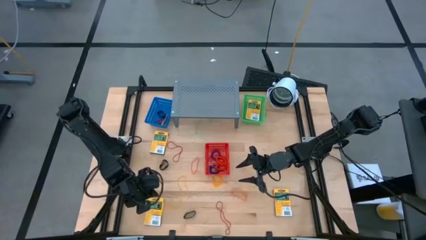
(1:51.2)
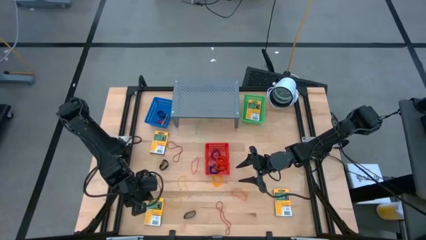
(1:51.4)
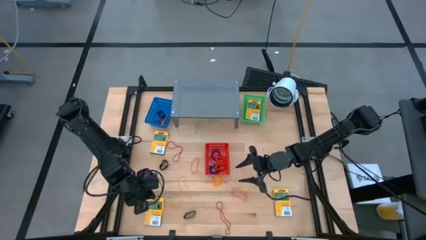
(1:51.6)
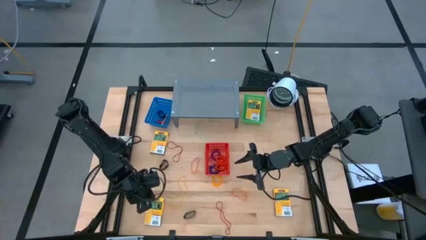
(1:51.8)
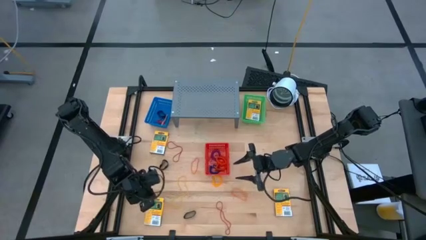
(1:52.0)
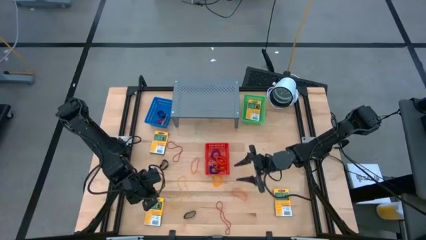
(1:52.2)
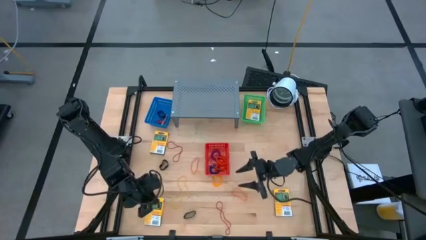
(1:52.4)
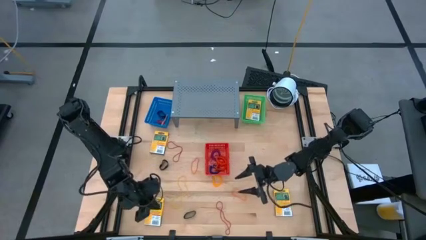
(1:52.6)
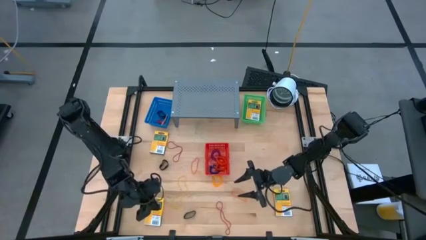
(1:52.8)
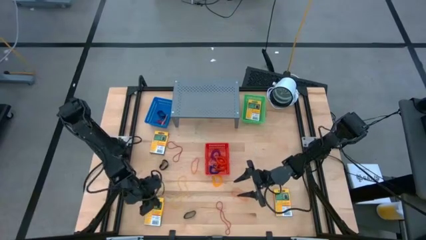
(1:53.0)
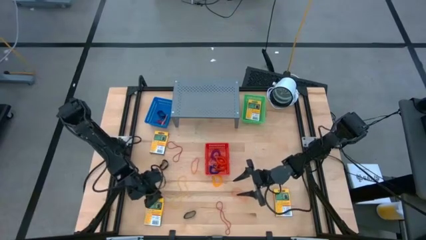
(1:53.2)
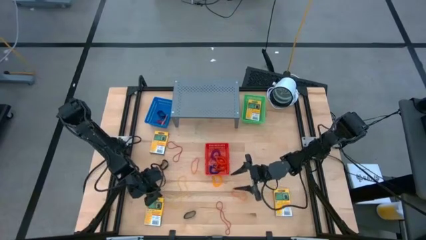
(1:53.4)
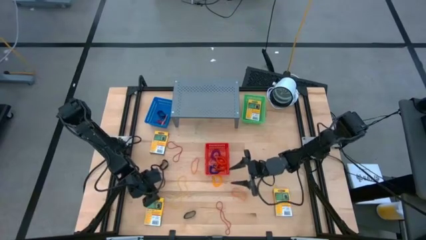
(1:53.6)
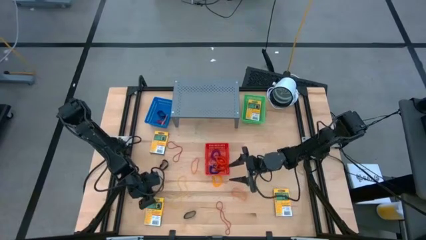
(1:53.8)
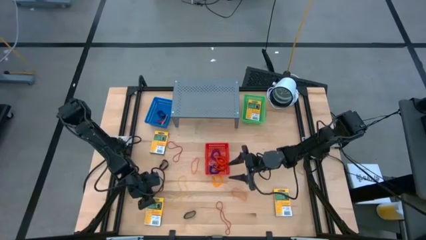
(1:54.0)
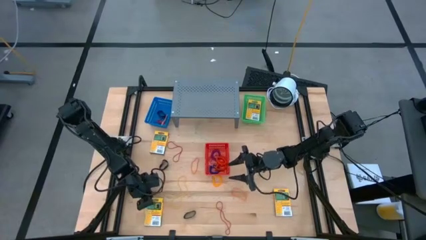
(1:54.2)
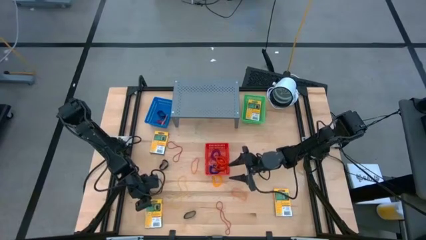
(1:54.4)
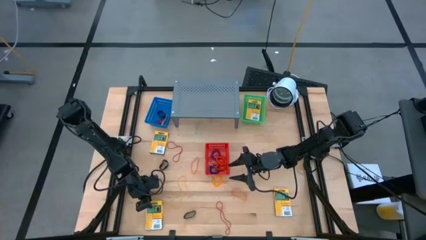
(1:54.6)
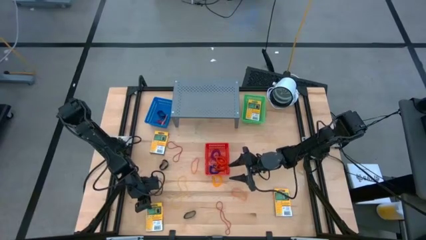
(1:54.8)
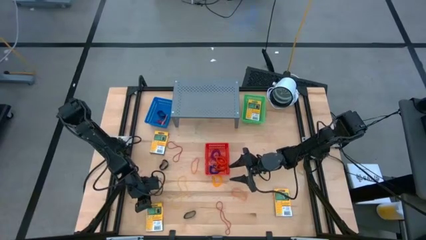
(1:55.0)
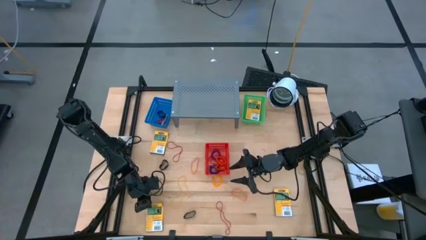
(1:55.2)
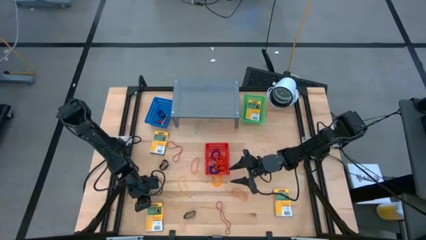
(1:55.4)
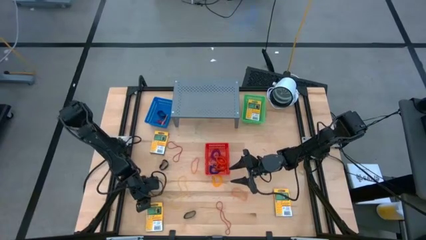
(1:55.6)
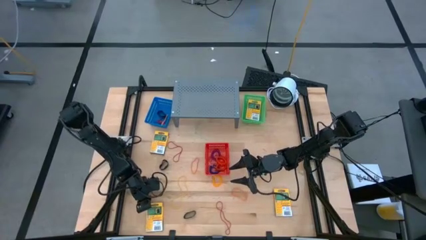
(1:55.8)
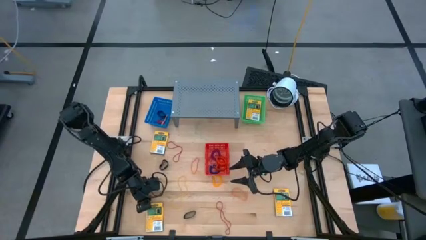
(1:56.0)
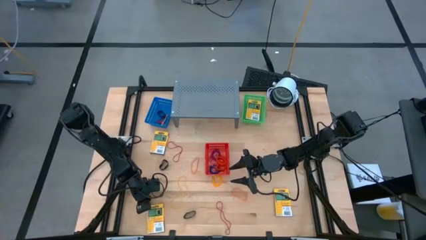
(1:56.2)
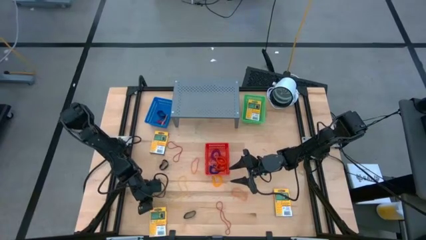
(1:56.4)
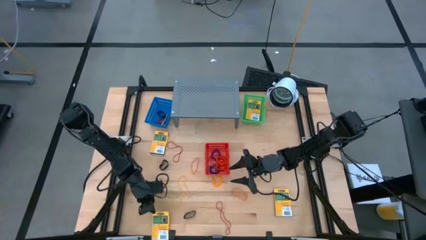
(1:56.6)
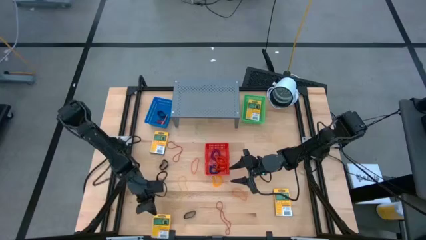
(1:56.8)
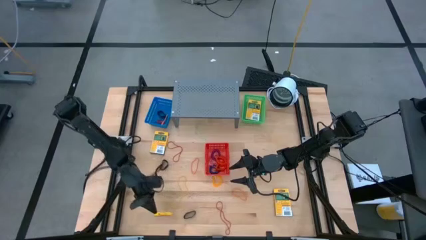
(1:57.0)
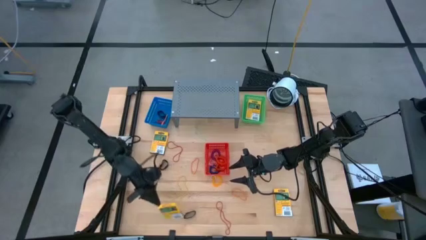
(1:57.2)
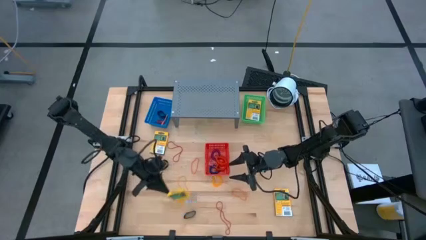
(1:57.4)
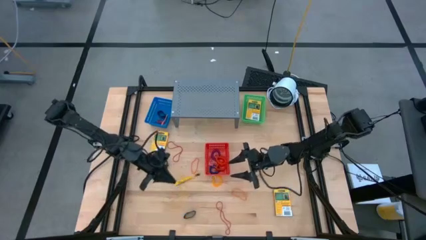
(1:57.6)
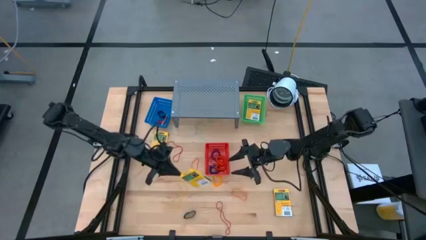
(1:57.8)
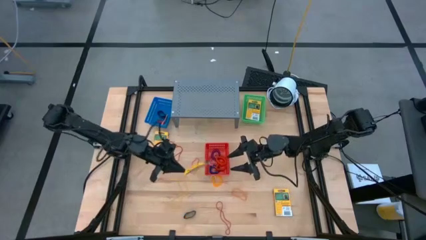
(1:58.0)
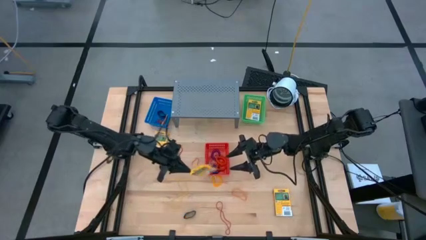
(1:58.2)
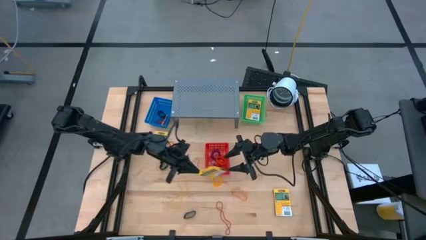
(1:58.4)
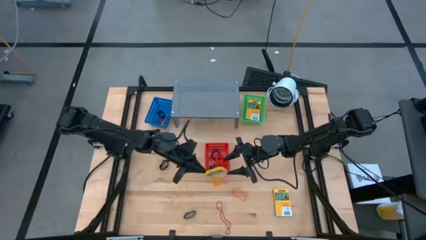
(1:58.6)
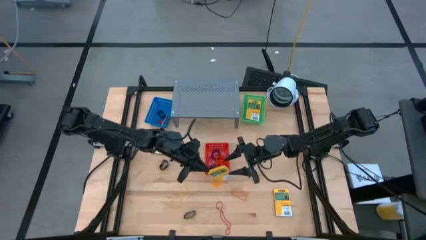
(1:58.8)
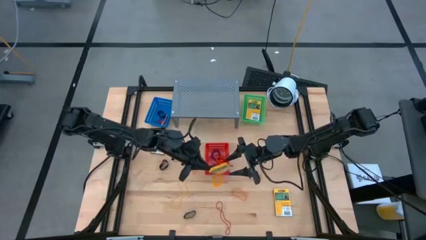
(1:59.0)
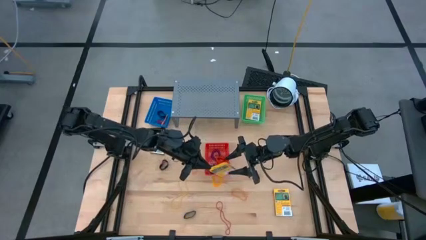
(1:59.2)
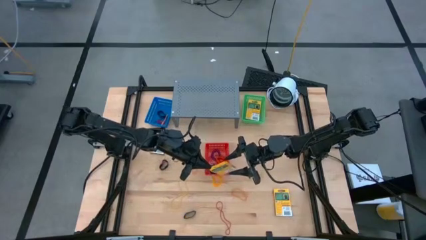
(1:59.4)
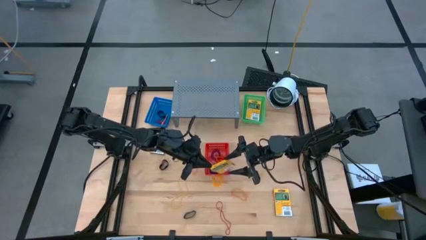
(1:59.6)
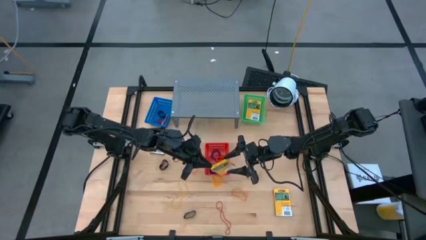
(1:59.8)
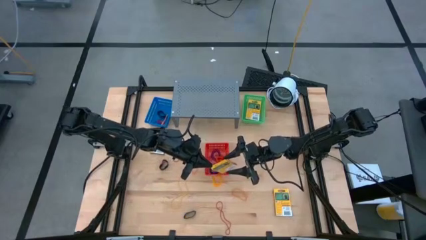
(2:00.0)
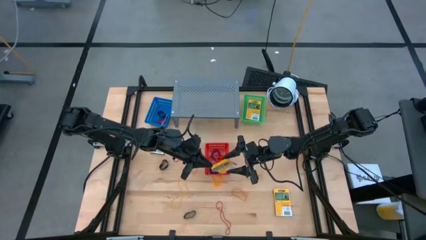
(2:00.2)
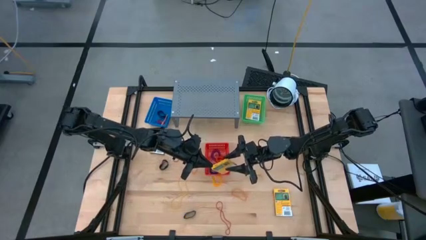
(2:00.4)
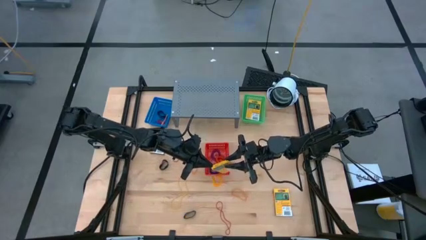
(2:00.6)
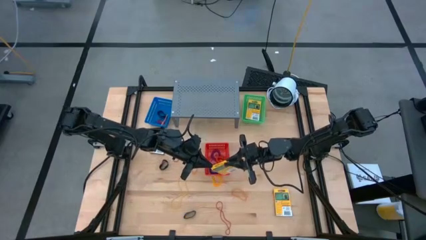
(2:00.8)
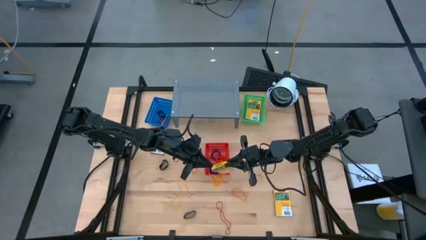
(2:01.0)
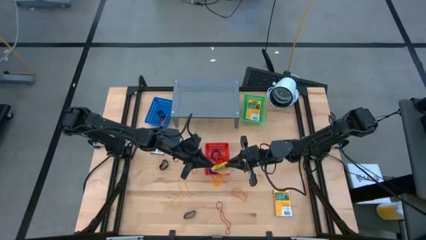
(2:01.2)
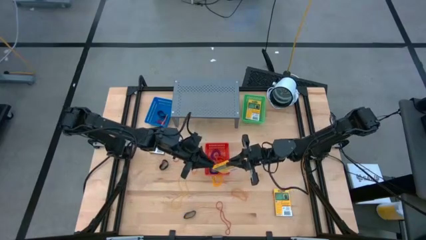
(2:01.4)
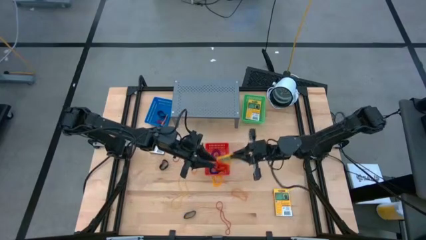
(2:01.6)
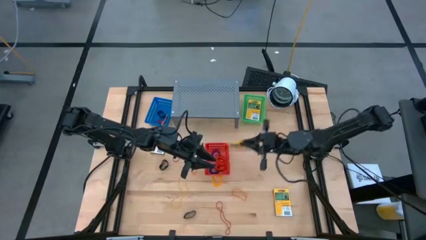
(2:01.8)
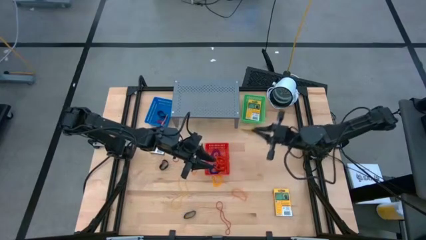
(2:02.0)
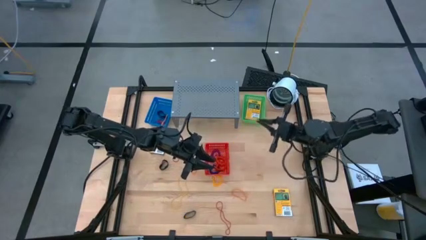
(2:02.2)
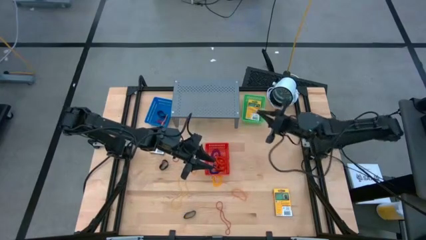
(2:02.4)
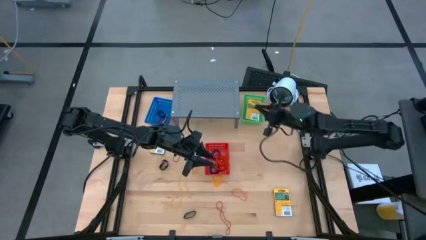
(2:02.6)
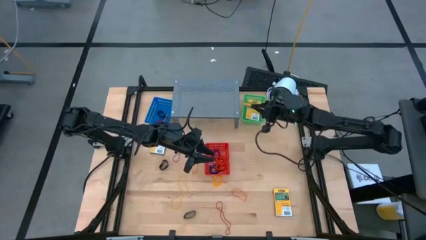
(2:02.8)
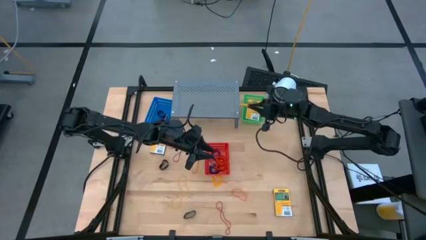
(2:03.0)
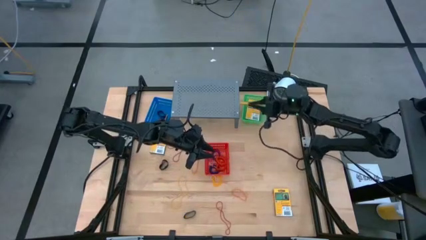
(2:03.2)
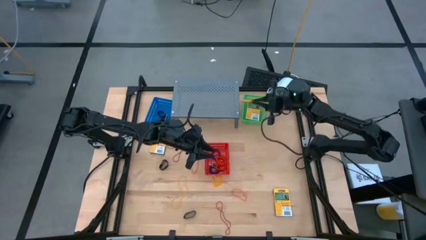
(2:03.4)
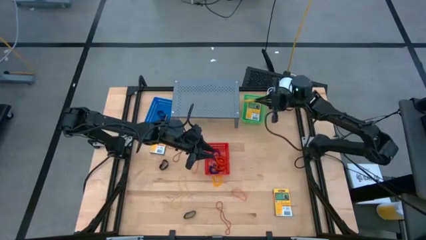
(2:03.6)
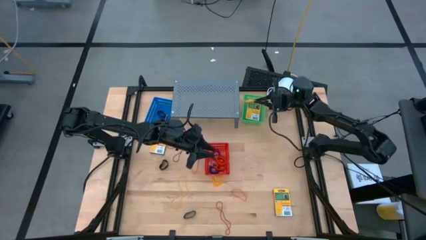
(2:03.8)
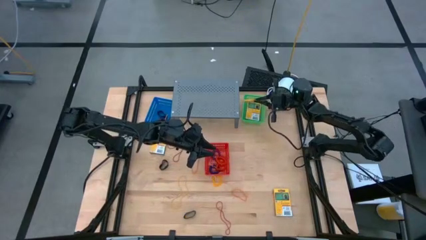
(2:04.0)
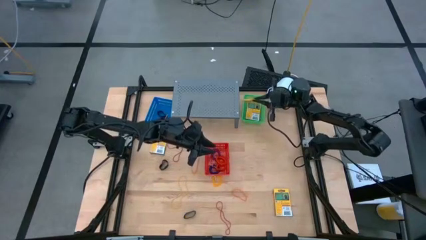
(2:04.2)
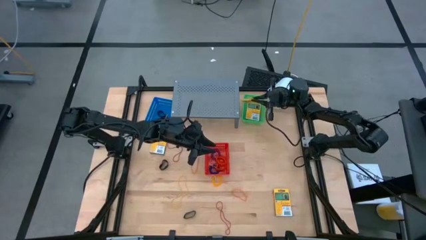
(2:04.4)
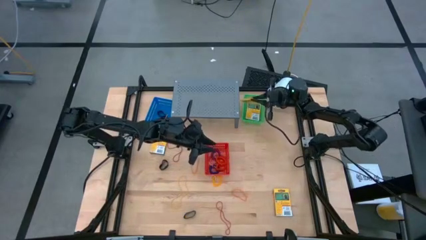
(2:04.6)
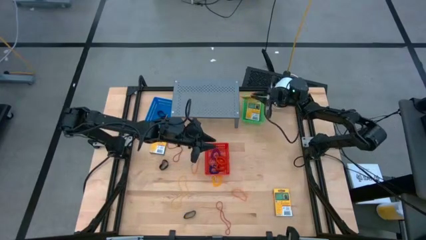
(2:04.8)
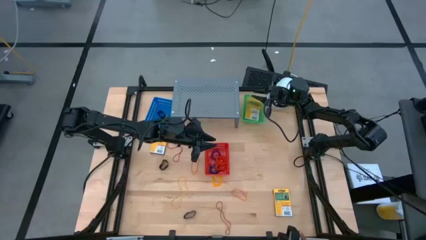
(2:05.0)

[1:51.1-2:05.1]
Task: Pick & Place Office Desk Supplies
Put the bottom left yellow crayon box into the green basket

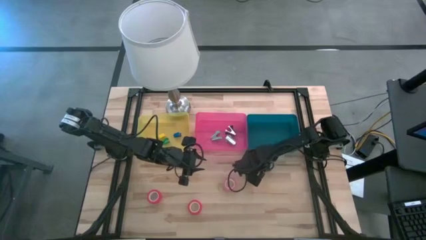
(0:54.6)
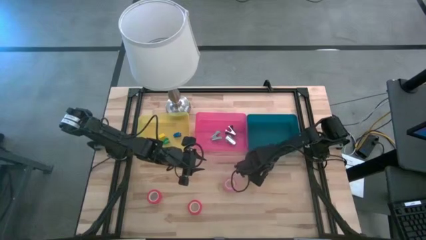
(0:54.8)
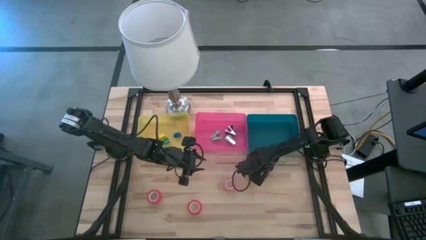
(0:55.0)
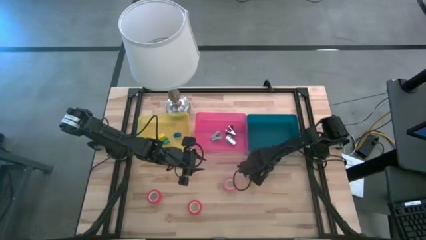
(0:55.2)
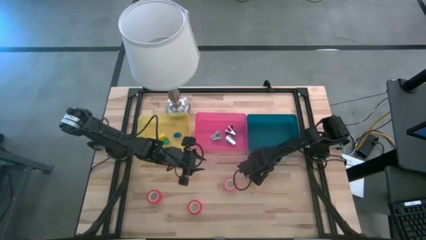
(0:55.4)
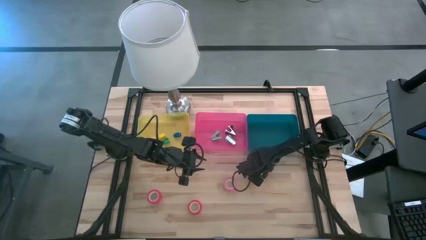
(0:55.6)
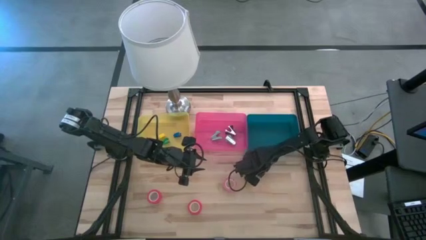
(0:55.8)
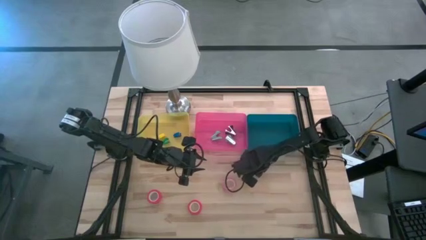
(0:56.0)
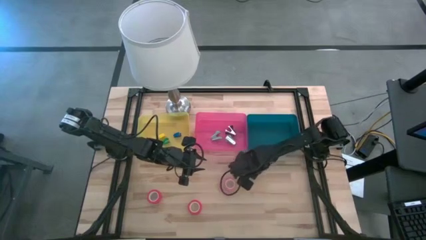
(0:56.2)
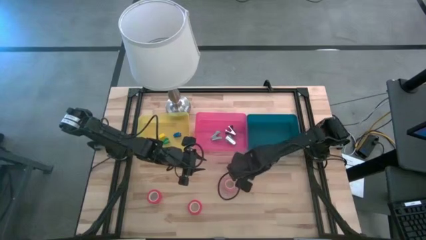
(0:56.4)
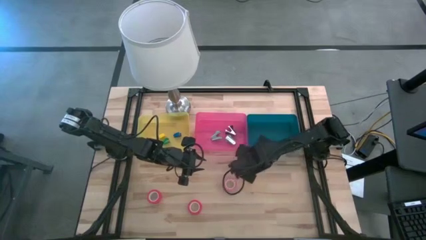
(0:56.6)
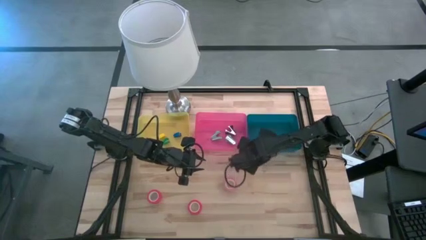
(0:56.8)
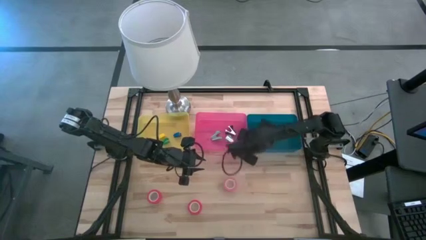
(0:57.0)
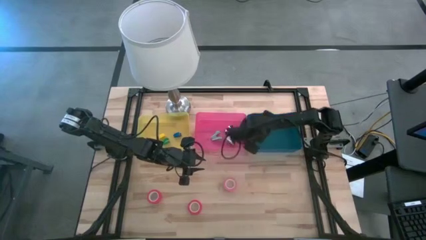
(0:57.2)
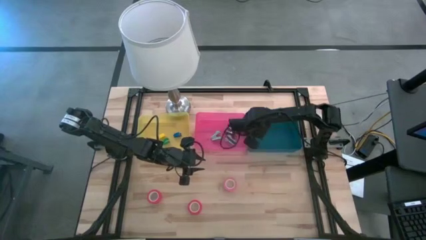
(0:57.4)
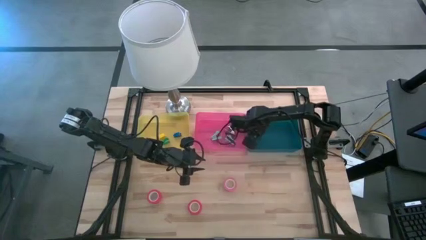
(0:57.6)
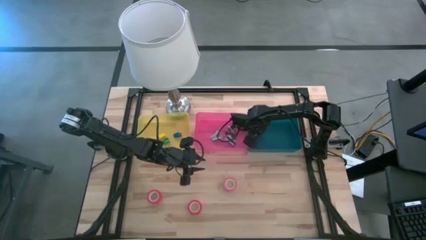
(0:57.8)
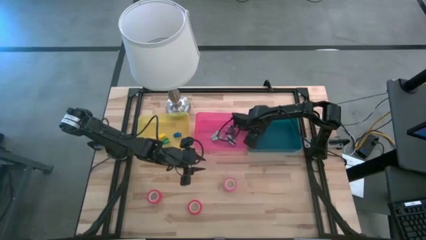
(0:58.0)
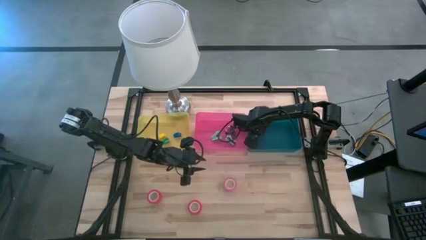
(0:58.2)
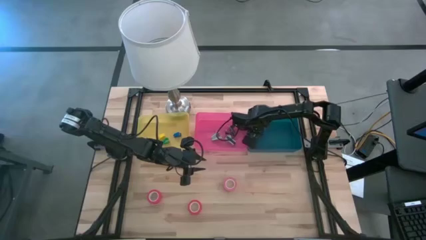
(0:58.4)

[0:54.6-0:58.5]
Task: Pick and place Stapler, Stapler remover, tape
Put the blue tape into the blue bin
